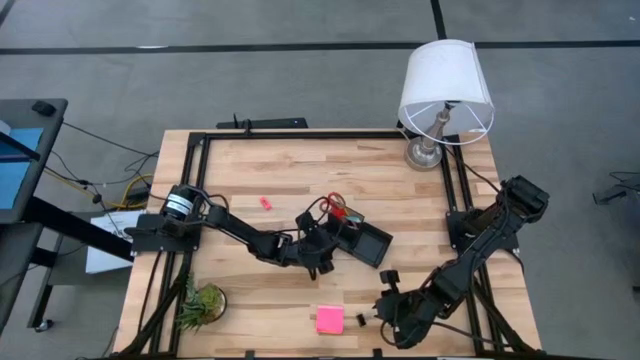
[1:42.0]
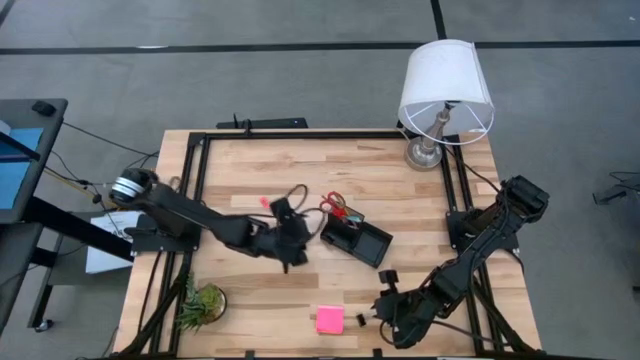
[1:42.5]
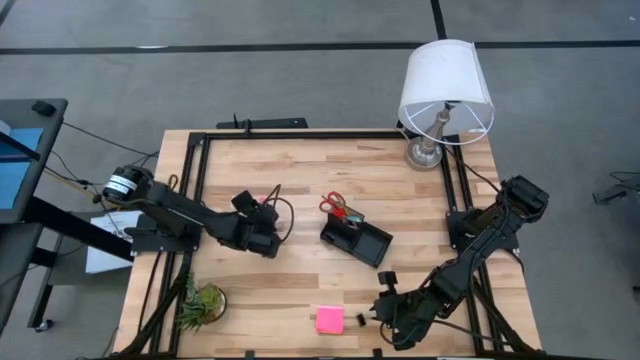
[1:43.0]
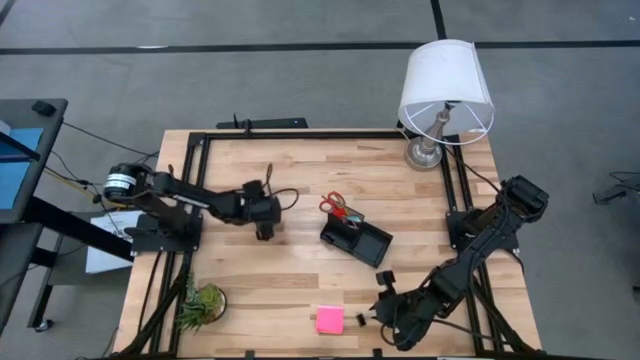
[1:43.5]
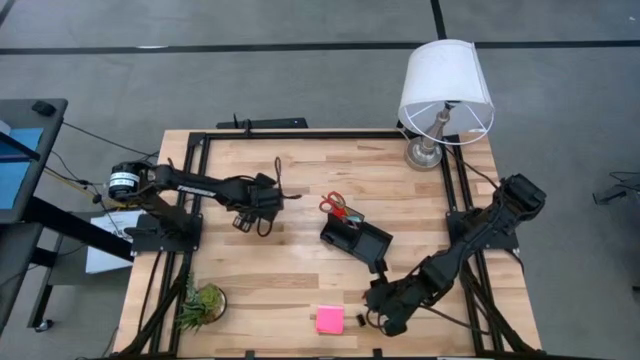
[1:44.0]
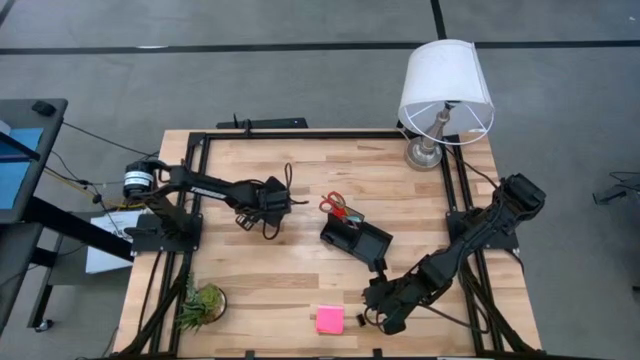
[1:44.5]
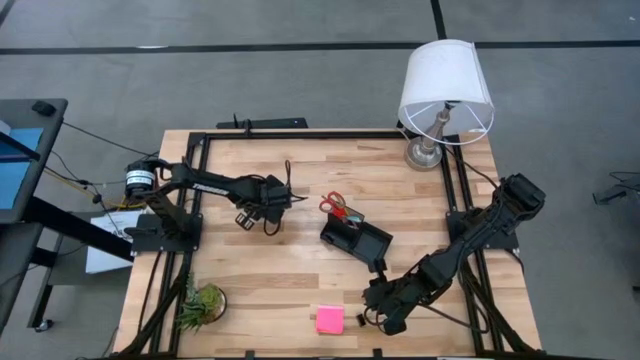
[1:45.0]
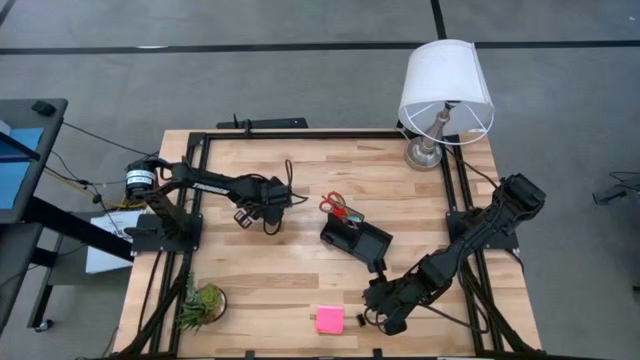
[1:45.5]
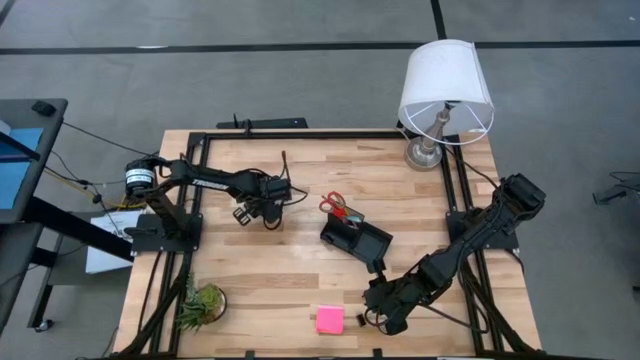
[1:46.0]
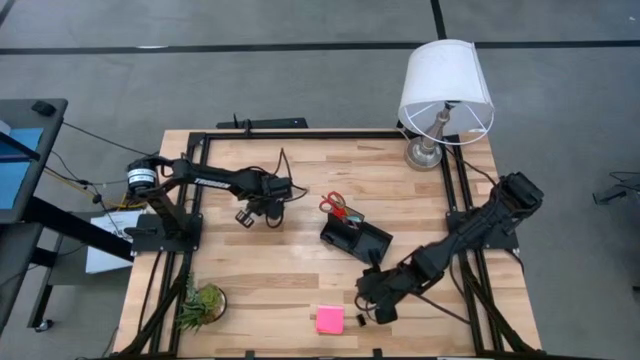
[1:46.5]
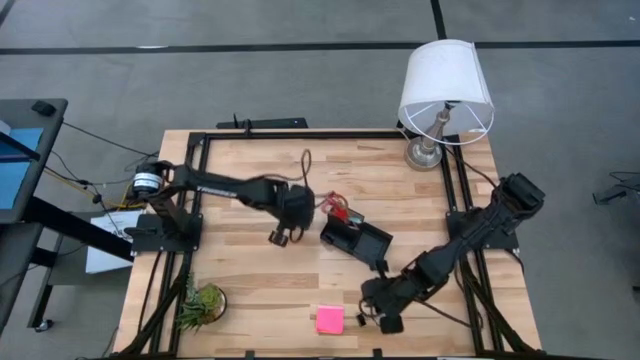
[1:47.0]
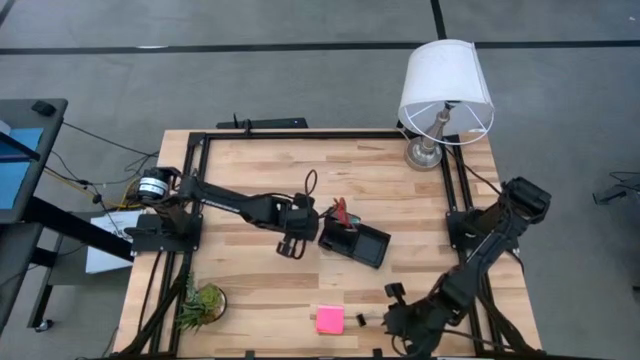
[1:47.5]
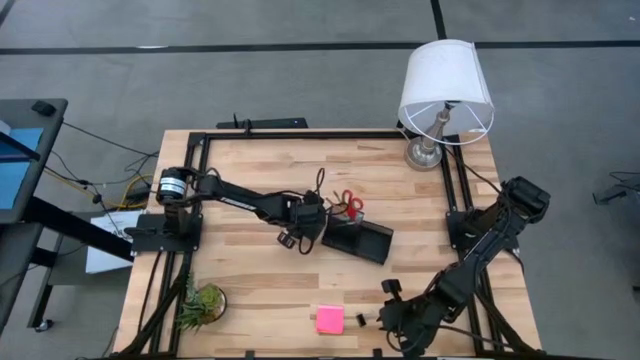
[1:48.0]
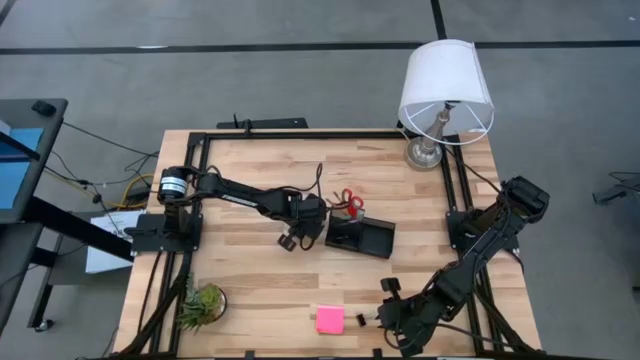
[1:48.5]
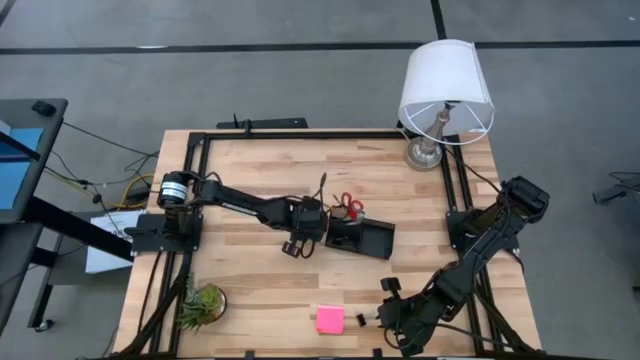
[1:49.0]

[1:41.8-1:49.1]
Task: Pick and place office supplies into organizer
Put the pink eraser into the desk organizer

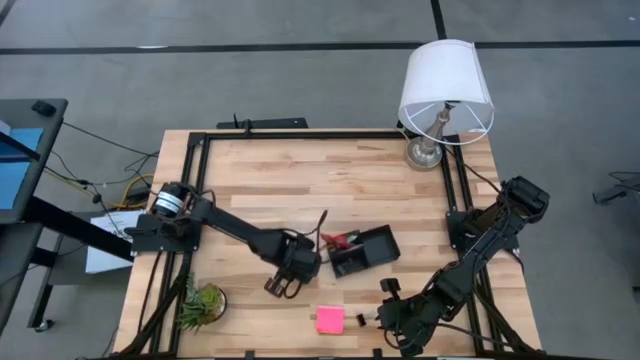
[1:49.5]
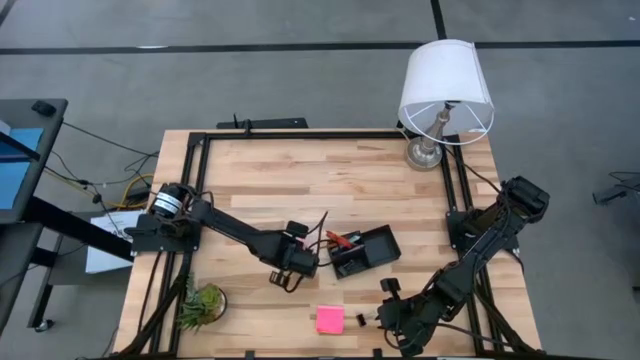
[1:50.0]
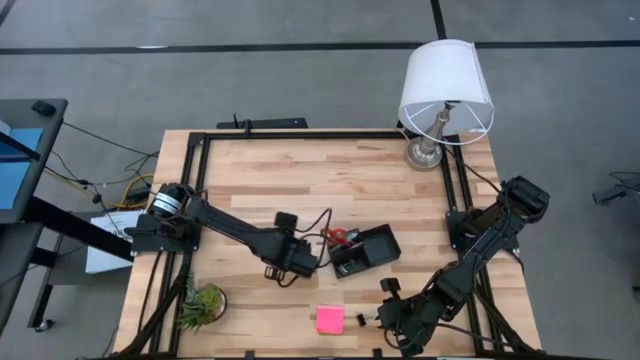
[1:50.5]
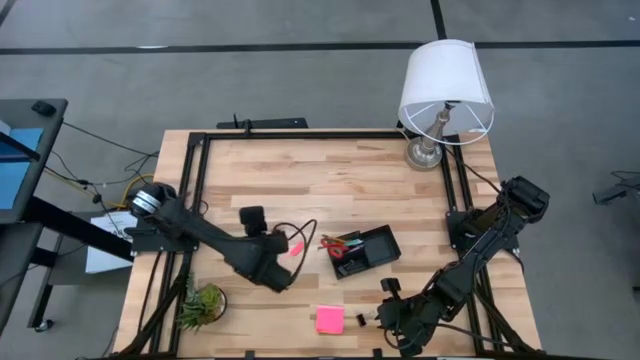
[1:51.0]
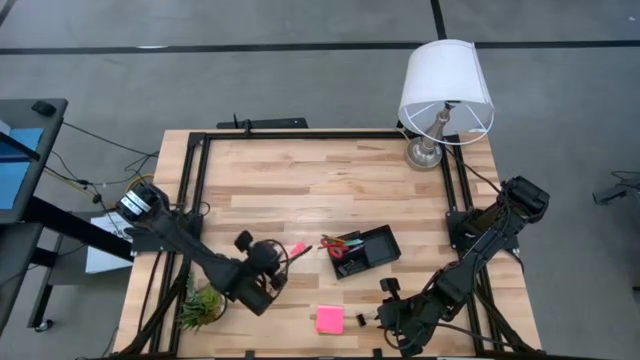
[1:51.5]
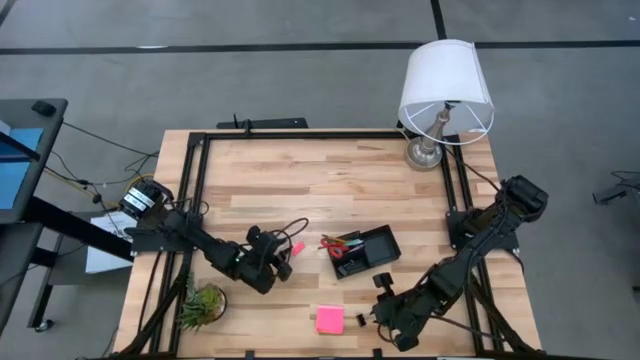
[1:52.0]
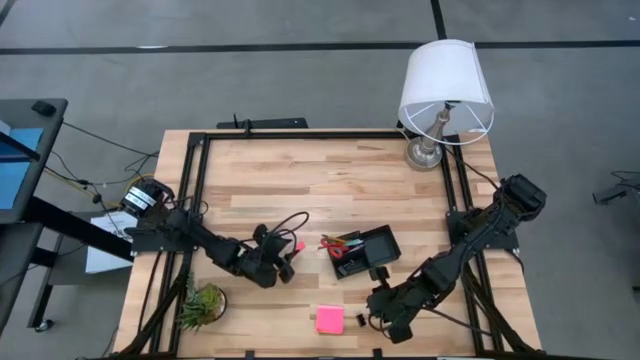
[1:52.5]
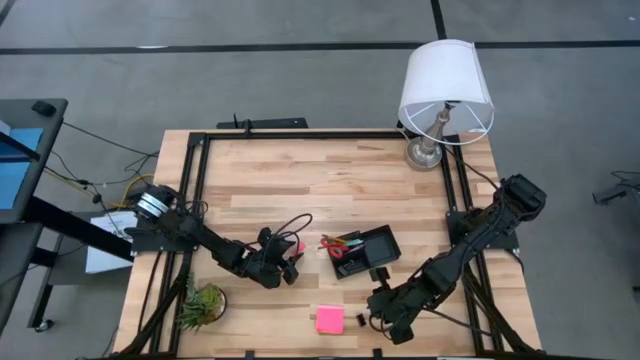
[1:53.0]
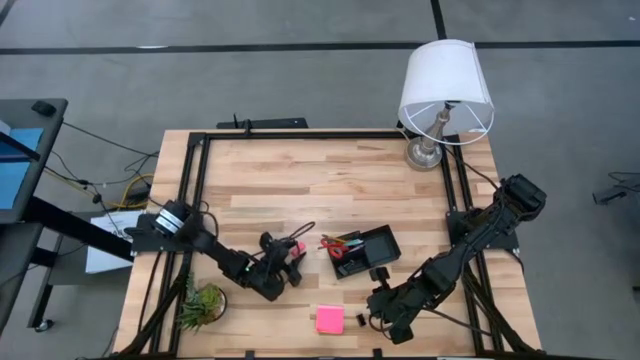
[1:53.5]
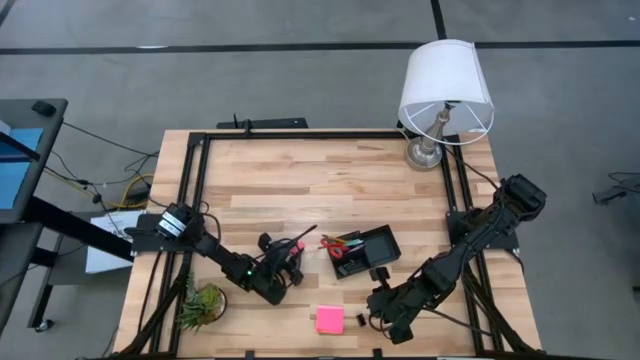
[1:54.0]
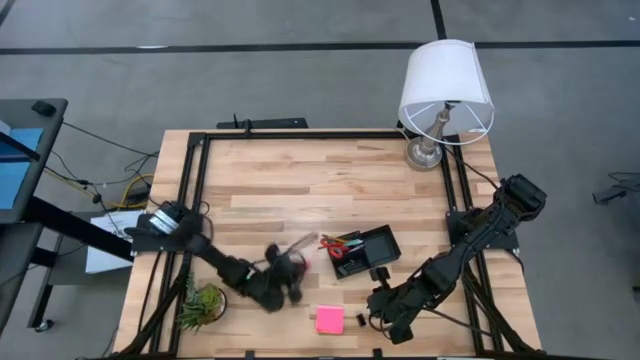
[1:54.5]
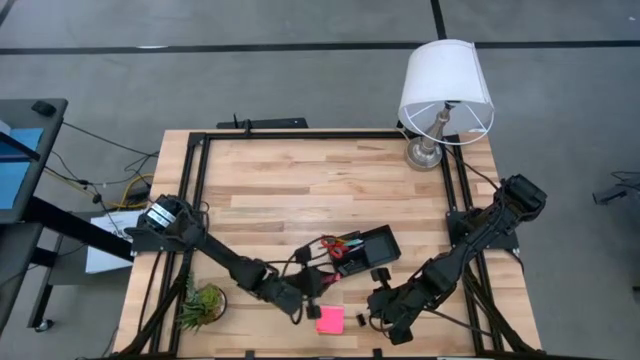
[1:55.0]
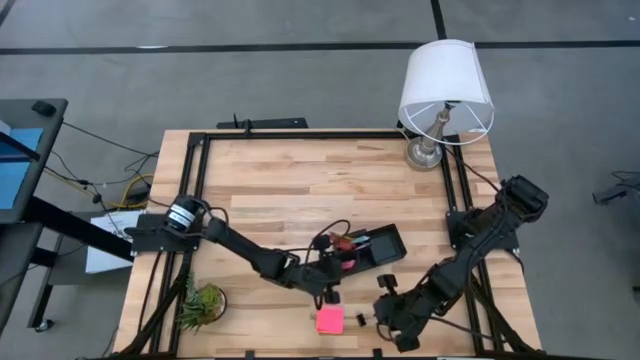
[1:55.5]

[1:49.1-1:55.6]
Put the pink eraser into the desk organizer

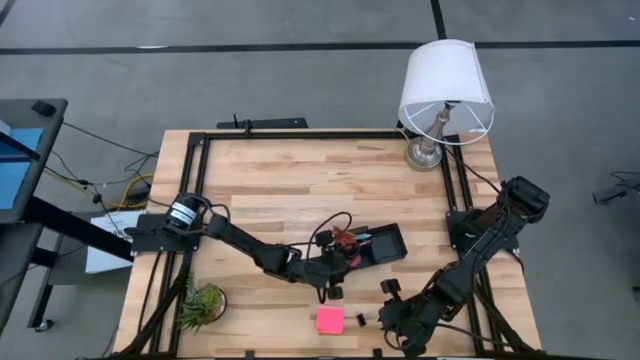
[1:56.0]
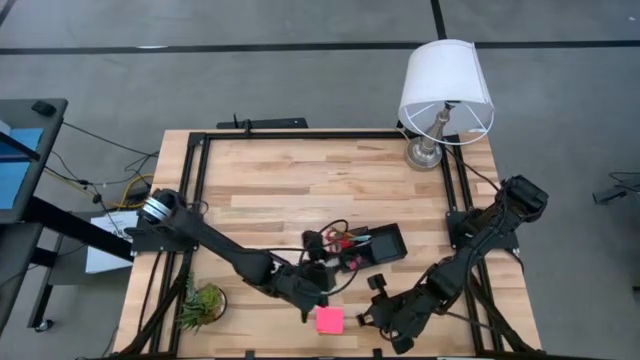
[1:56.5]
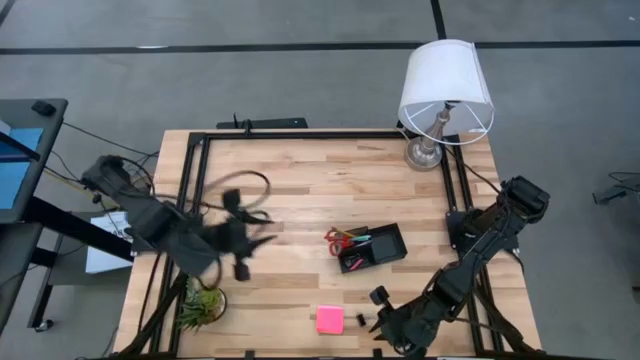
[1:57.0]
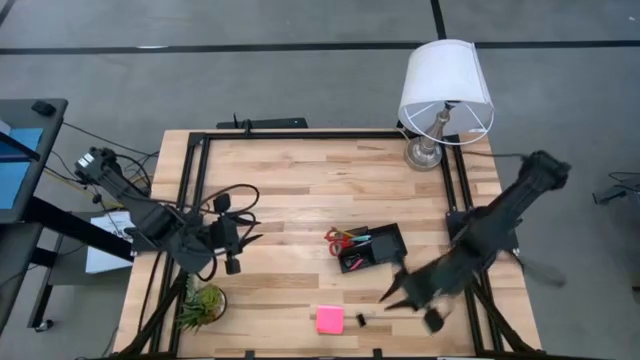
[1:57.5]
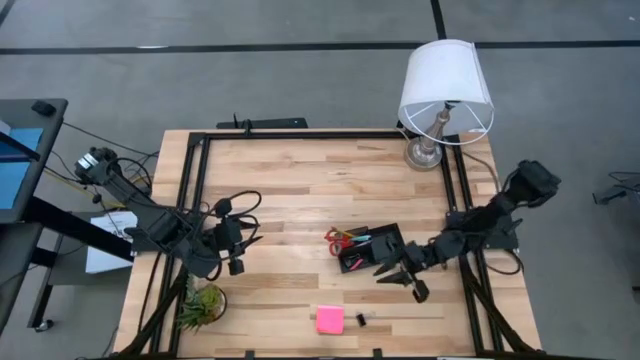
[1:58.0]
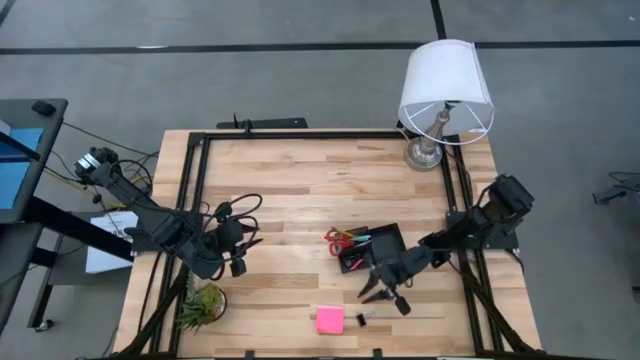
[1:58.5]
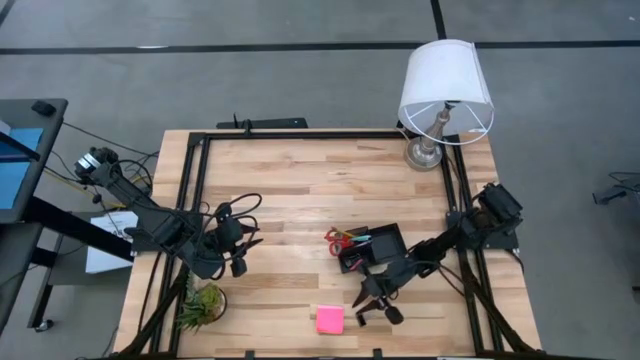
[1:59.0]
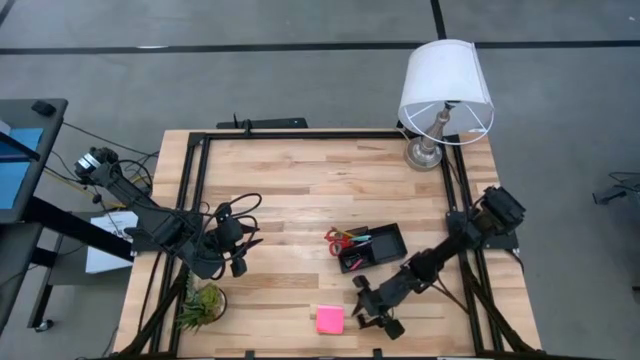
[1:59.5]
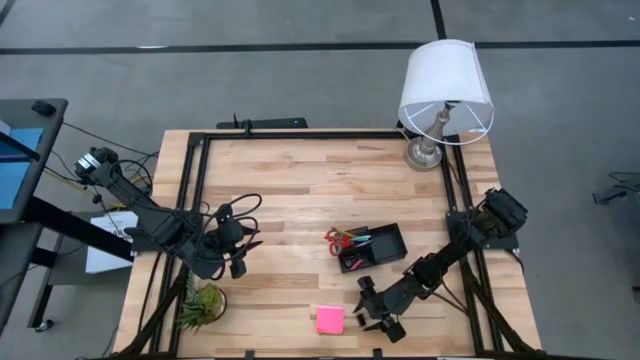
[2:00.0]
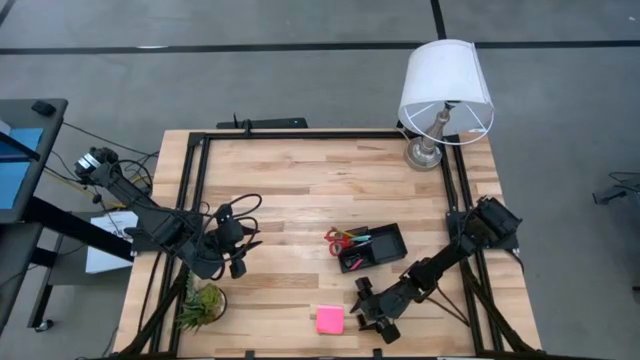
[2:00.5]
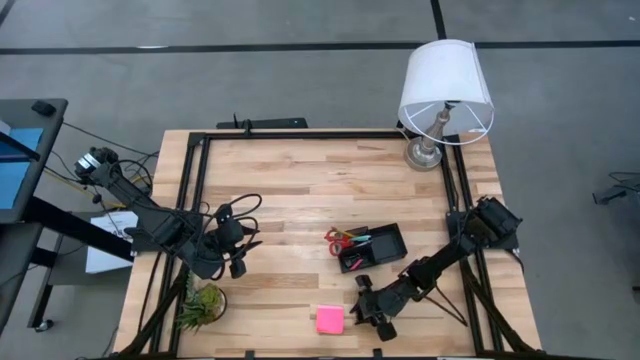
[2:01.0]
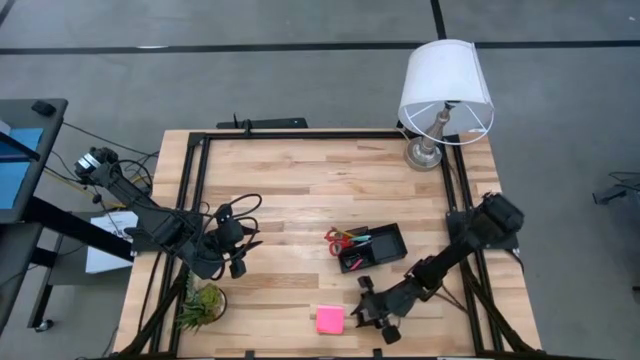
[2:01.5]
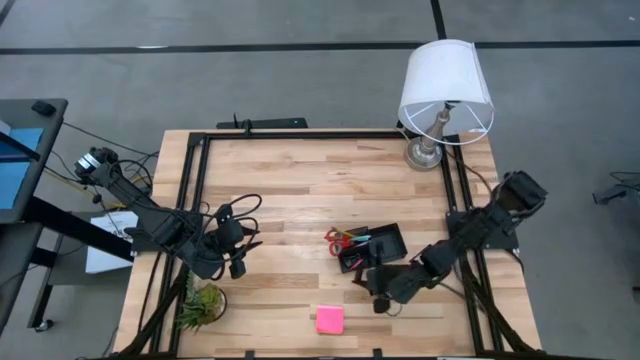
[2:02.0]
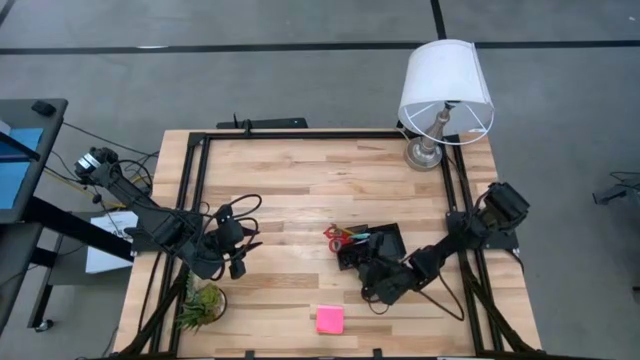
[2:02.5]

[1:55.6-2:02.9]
Put the binder clip into the desk organizer
